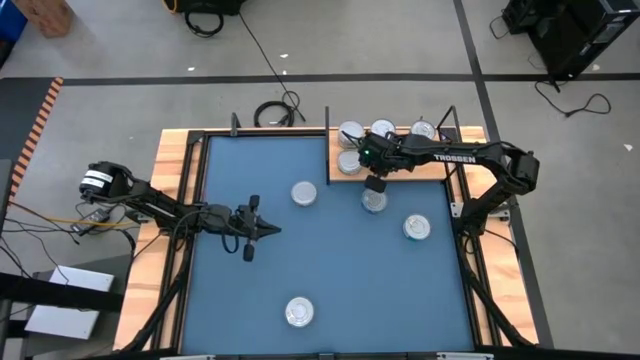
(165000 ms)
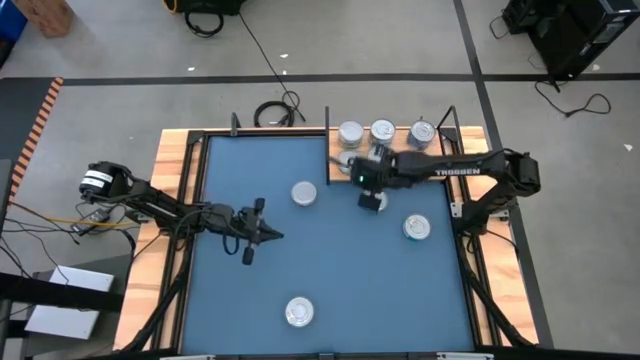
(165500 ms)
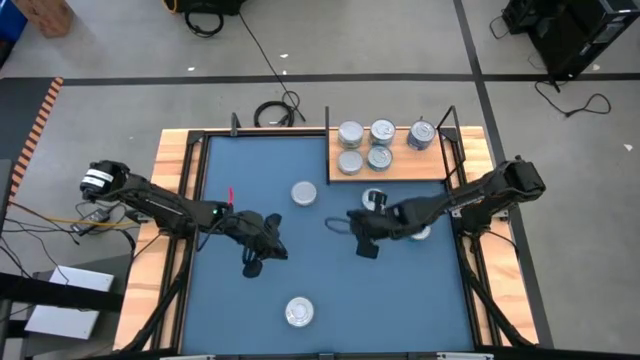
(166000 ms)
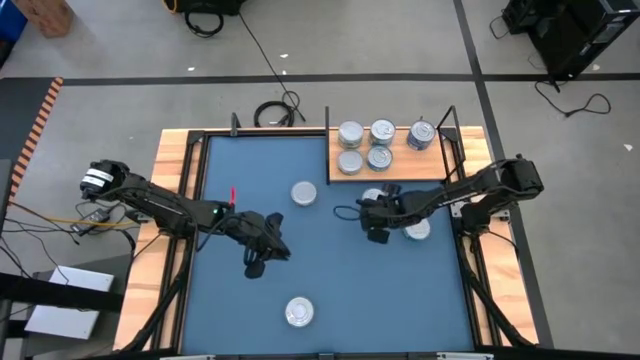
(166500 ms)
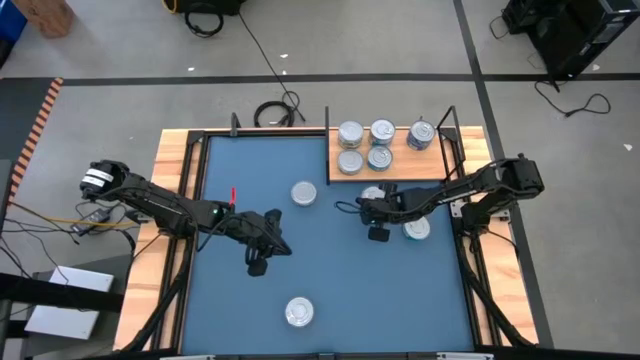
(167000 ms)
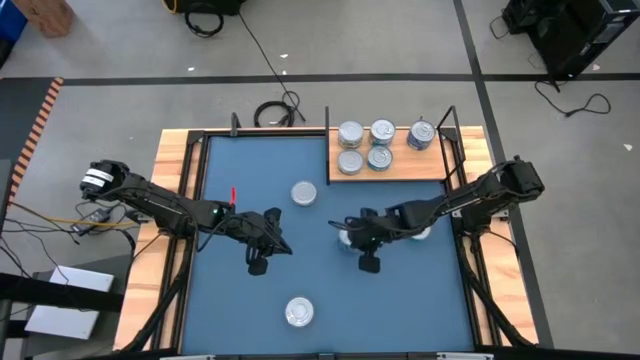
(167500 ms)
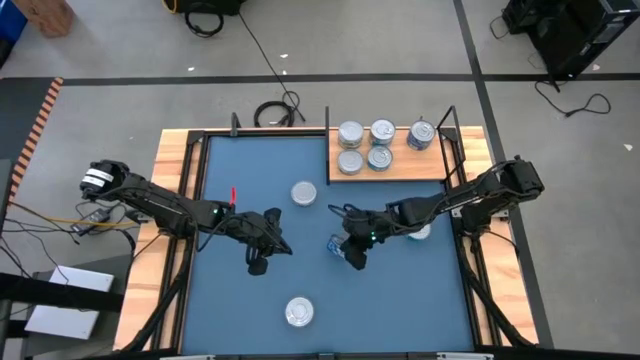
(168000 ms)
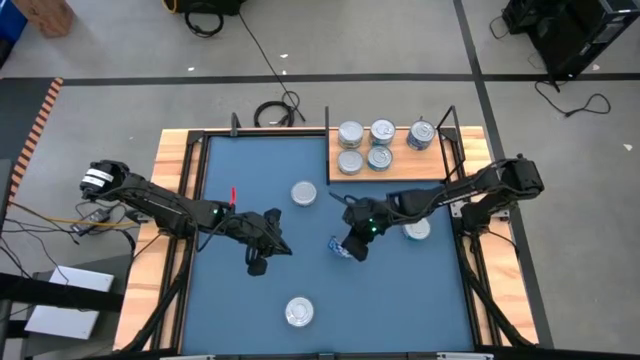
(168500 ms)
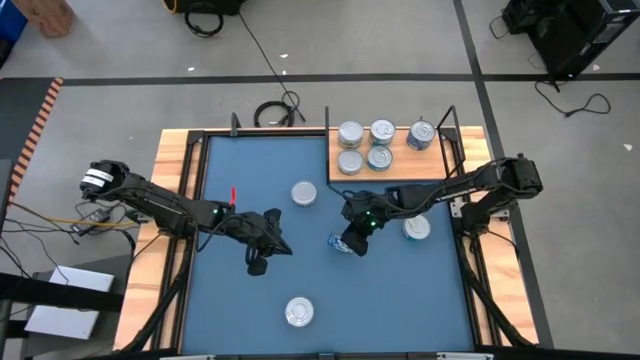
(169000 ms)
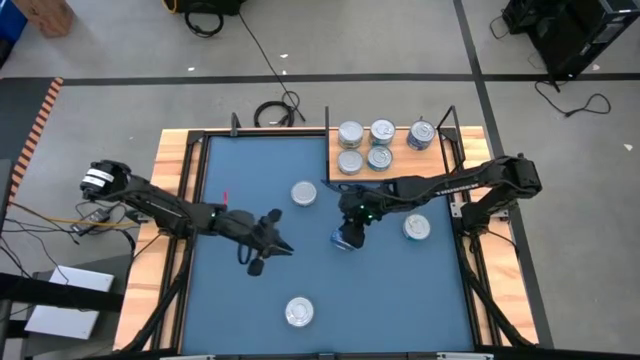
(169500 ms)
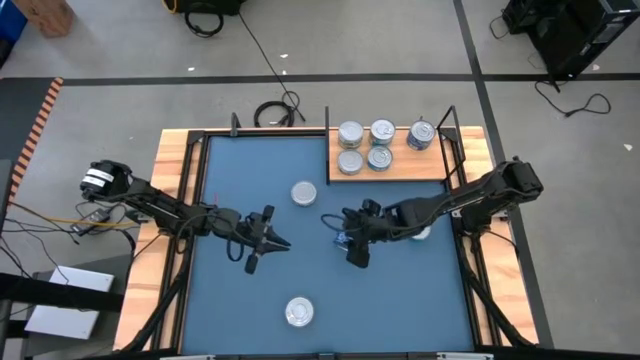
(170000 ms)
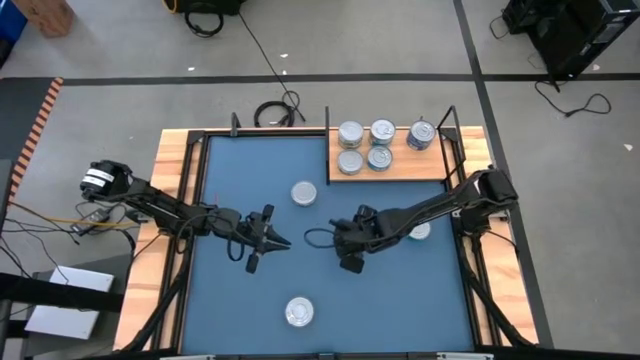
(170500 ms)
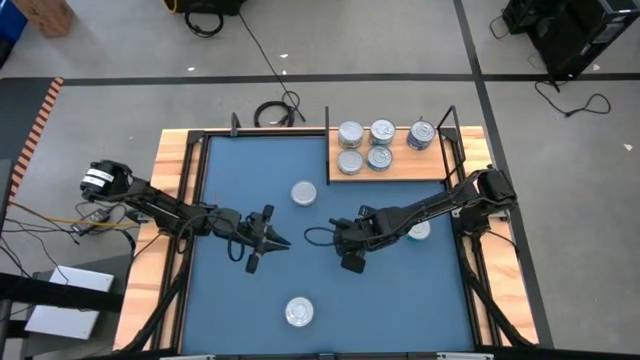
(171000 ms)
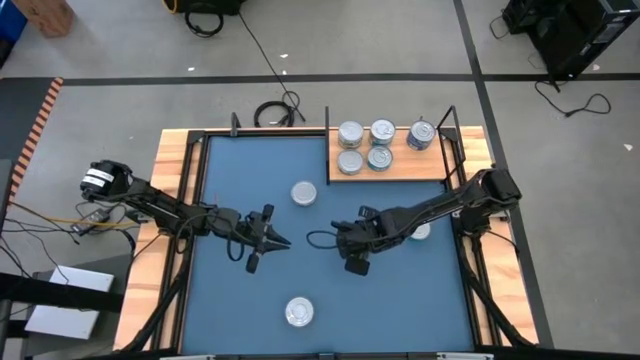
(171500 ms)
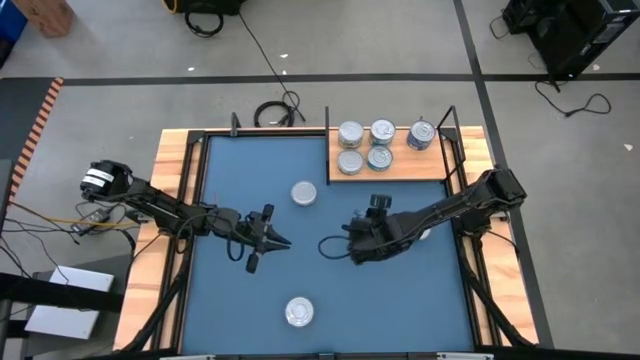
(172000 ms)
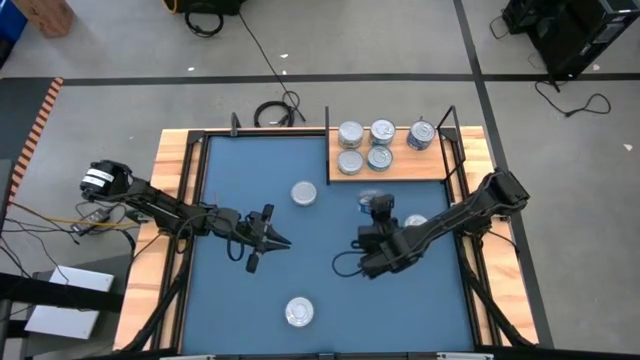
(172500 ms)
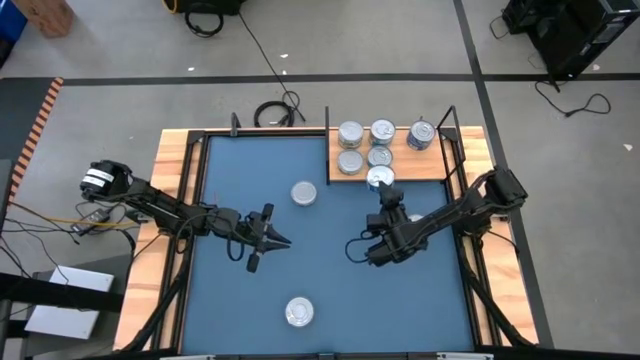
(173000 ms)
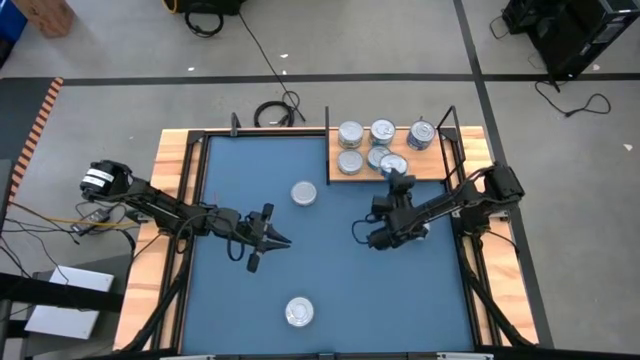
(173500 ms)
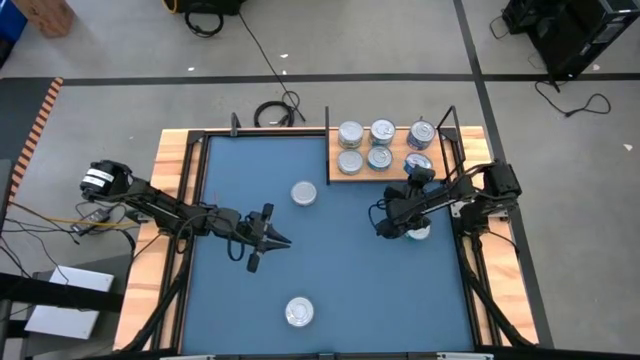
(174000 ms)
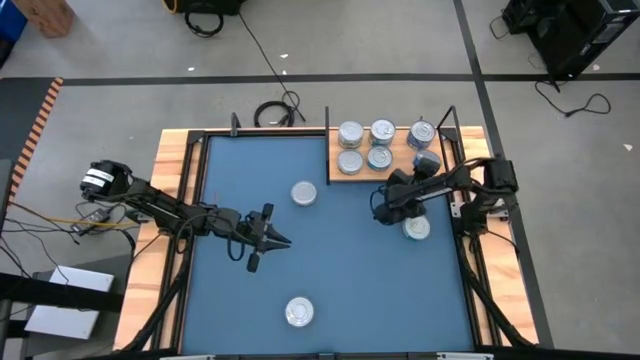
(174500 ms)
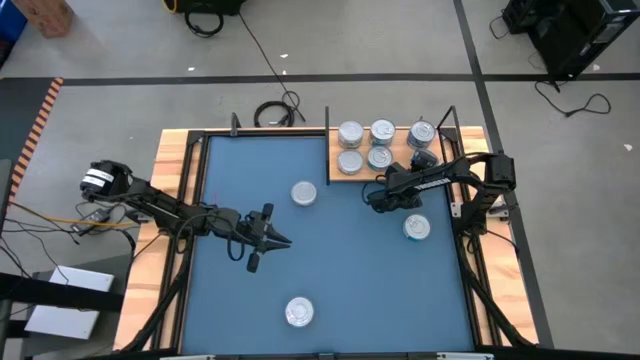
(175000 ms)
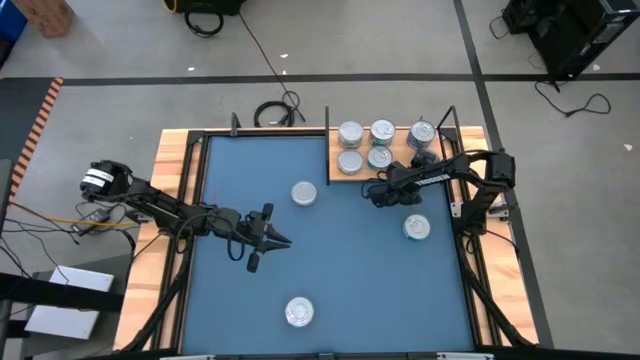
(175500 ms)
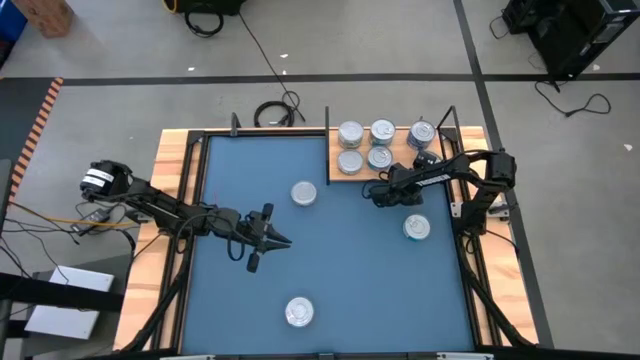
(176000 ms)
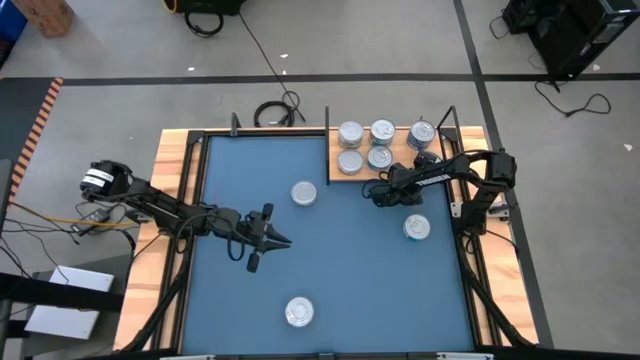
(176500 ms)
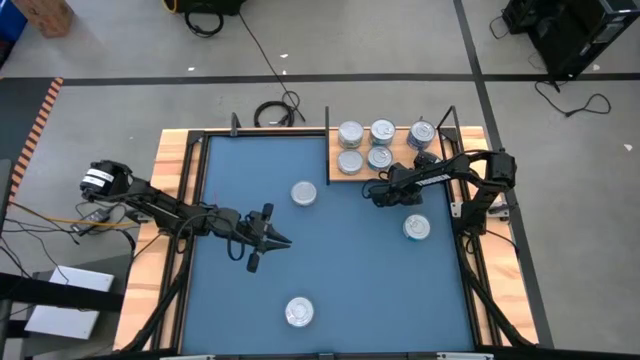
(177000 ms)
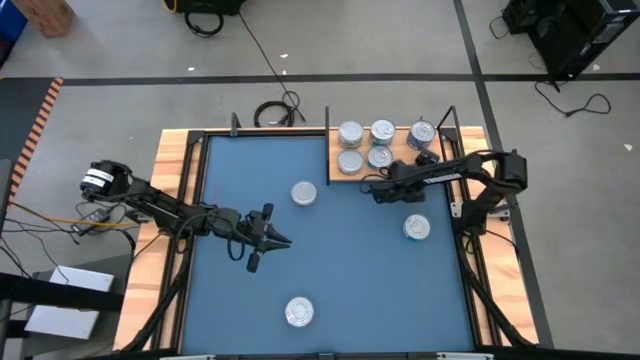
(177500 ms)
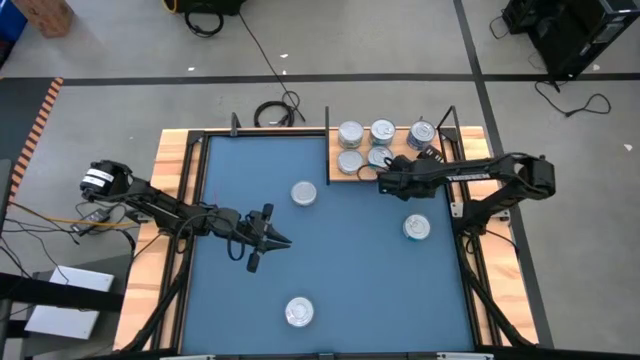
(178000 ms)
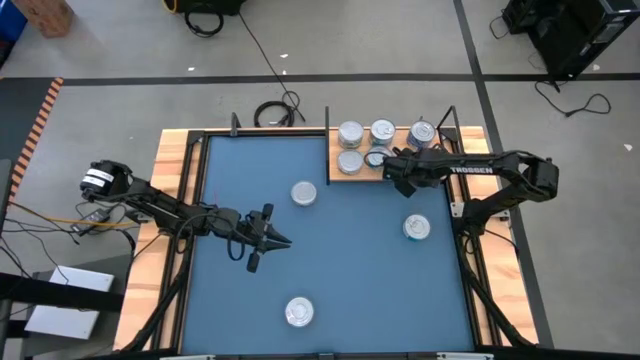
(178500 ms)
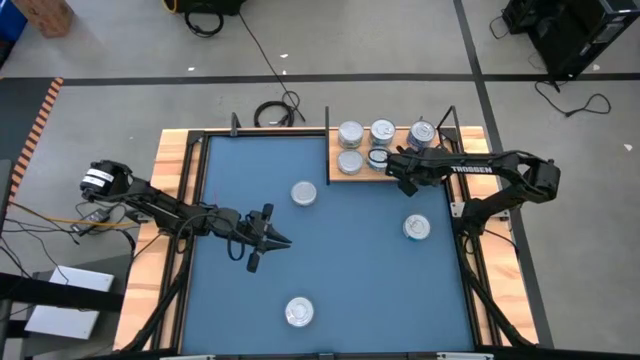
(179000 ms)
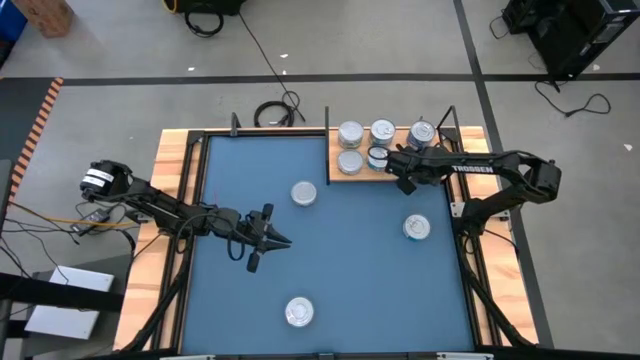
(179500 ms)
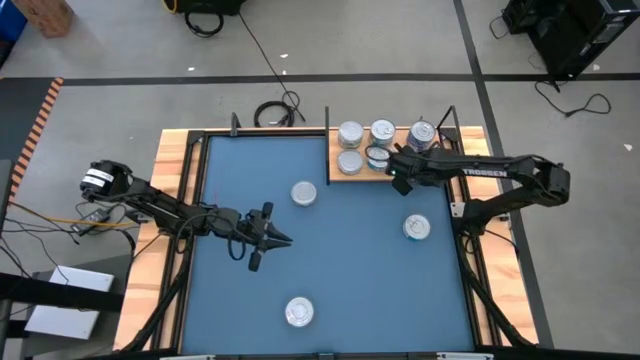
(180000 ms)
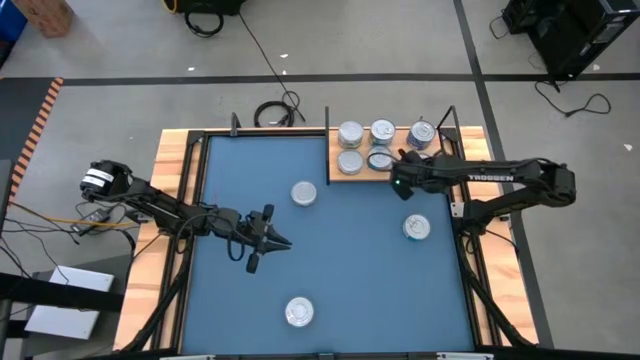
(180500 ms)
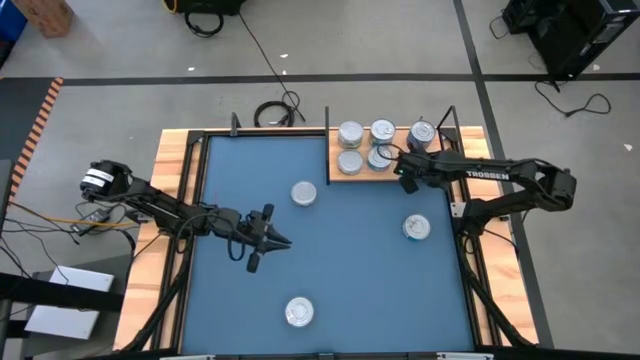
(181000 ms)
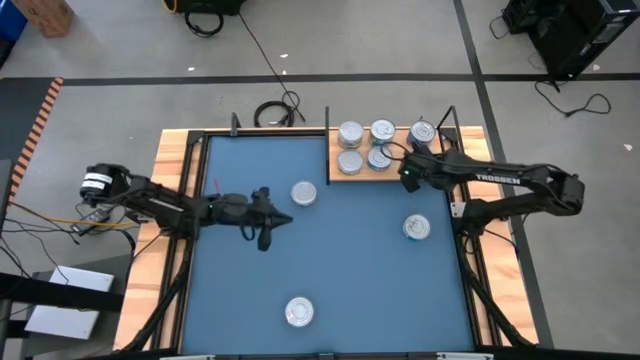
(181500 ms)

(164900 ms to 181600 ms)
Task: Stack canned seafood by type on shelf
Put the blue tuna can on the shelf

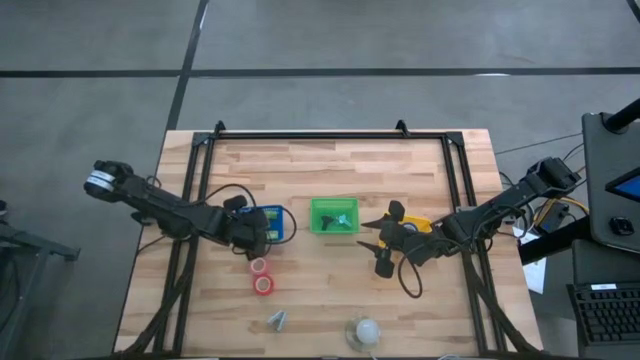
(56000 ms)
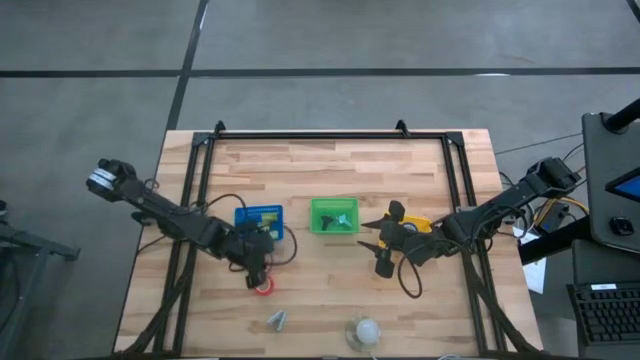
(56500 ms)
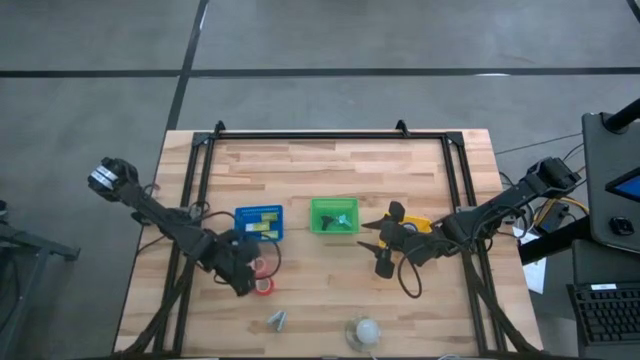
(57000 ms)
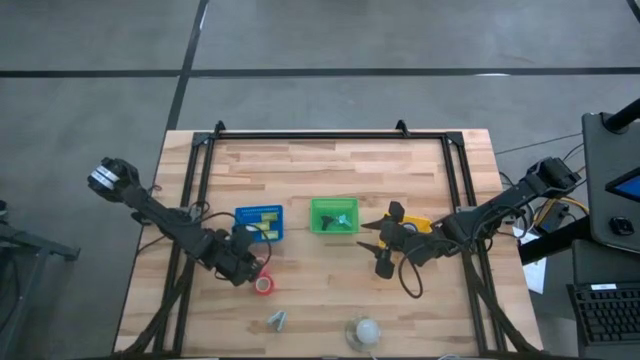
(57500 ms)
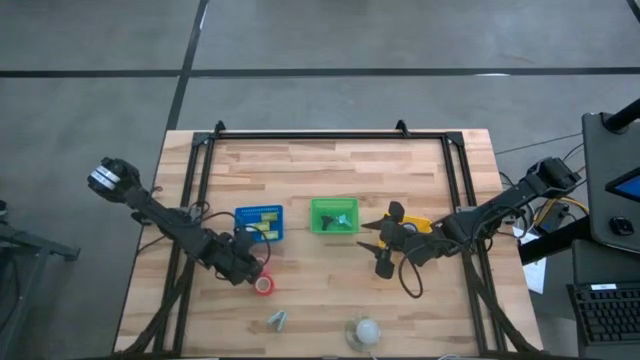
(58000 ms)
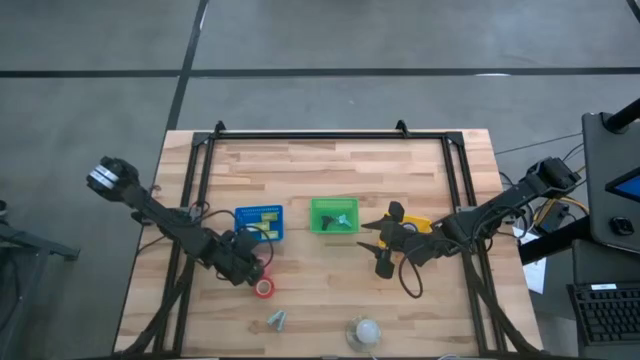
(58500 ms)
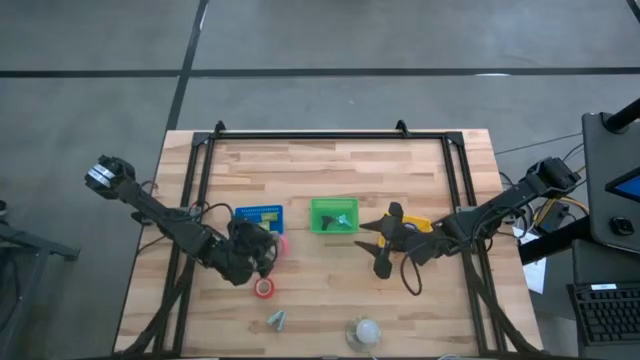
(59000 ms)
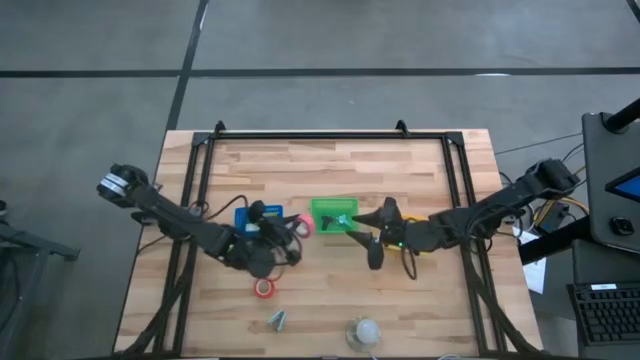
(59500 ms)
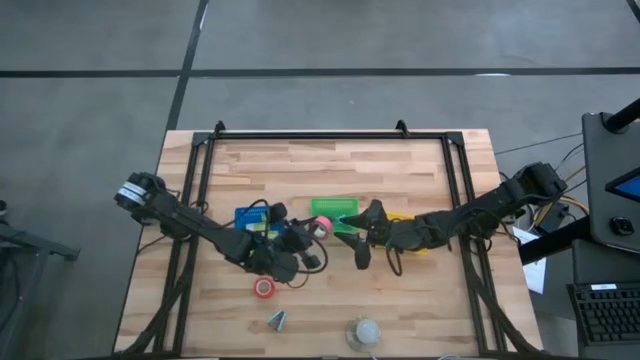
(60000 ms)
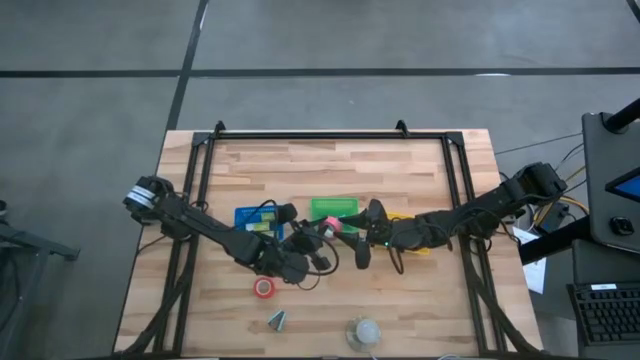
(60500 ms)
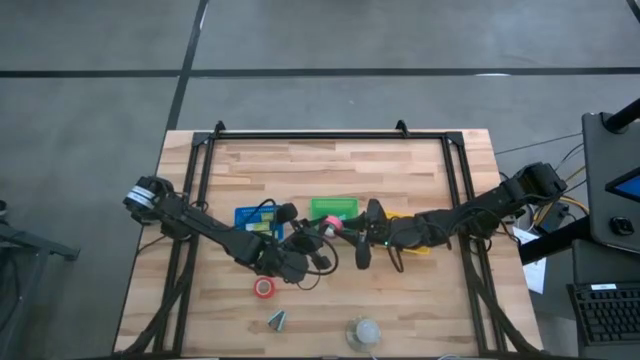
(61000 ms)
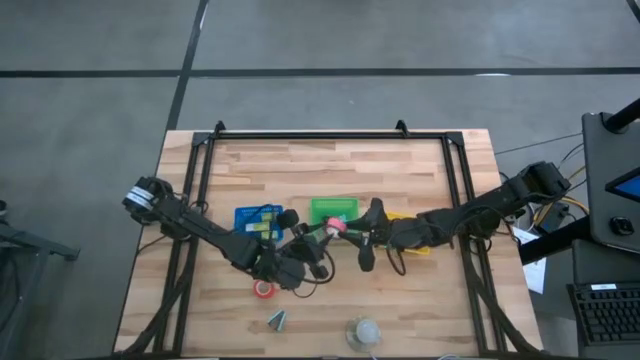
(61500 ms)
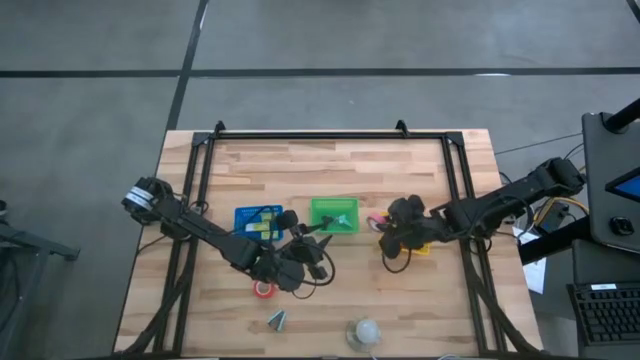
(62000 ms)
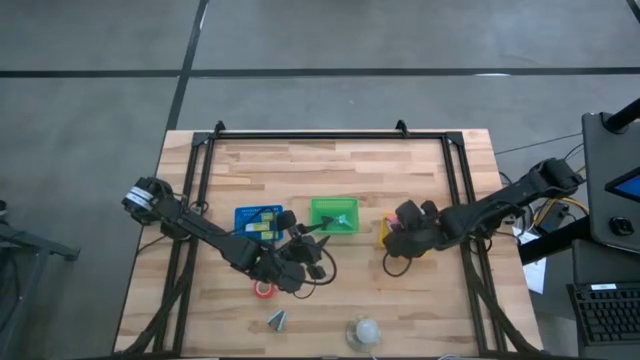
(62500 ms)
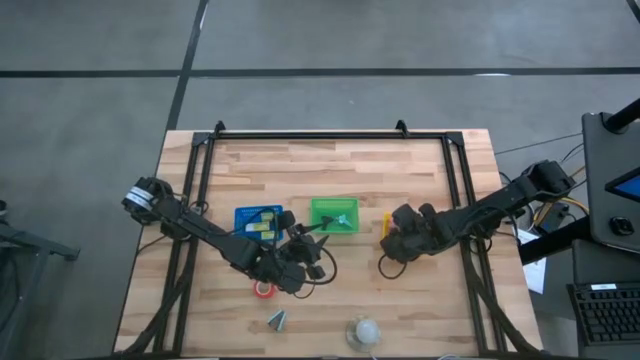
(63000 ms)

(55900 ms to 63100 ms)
Task: Pick and place Stapler, Stapler remover, tape
Put the pink tape into the yellow bin
